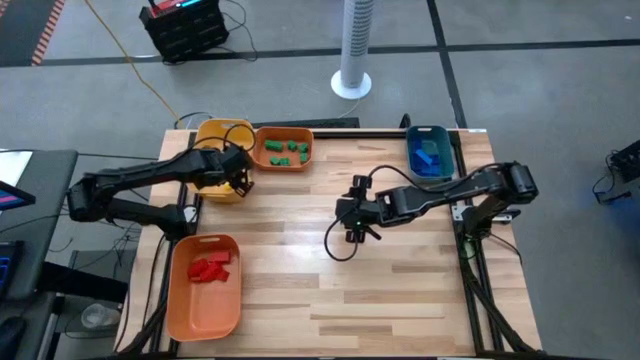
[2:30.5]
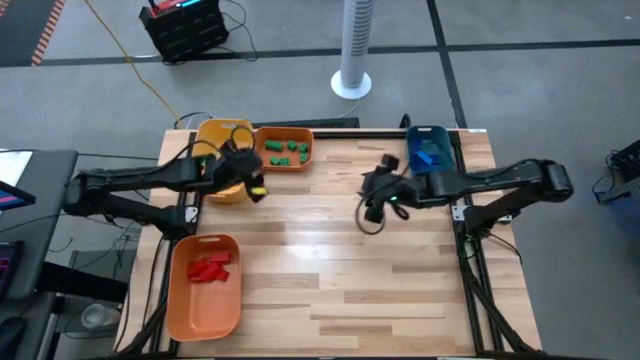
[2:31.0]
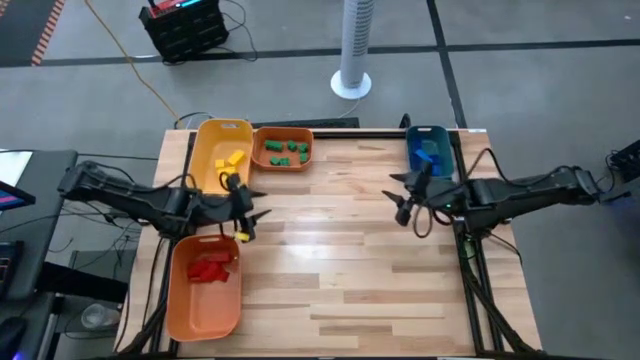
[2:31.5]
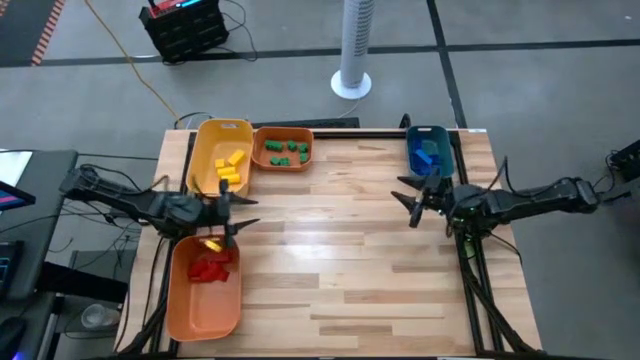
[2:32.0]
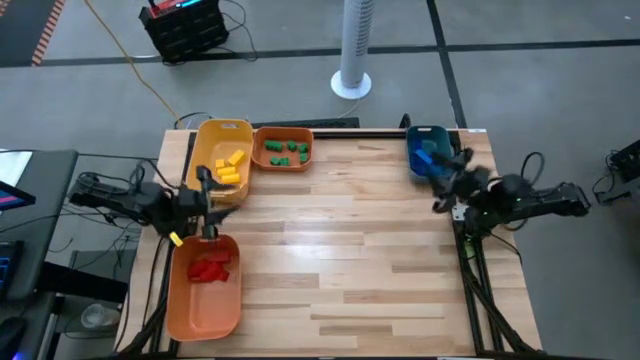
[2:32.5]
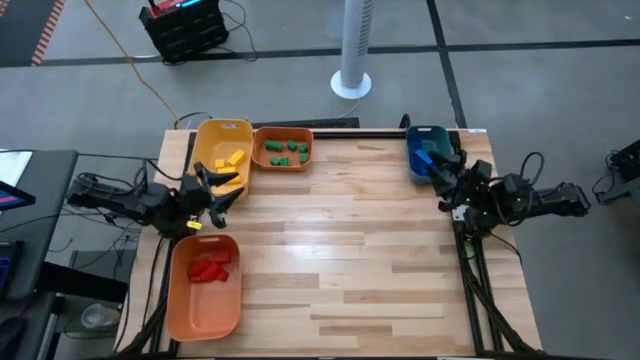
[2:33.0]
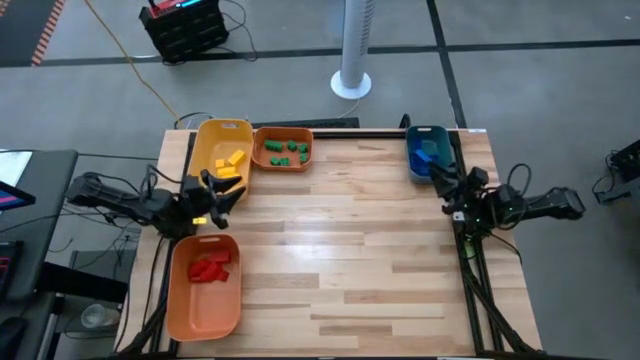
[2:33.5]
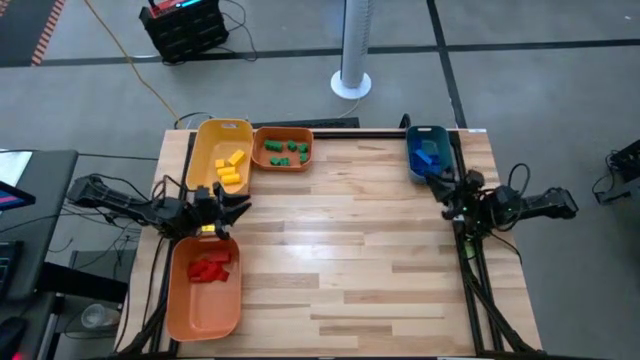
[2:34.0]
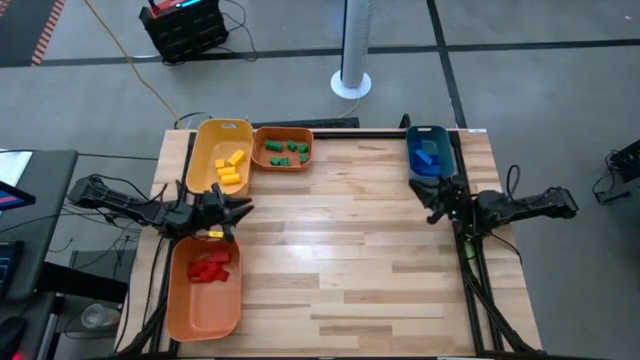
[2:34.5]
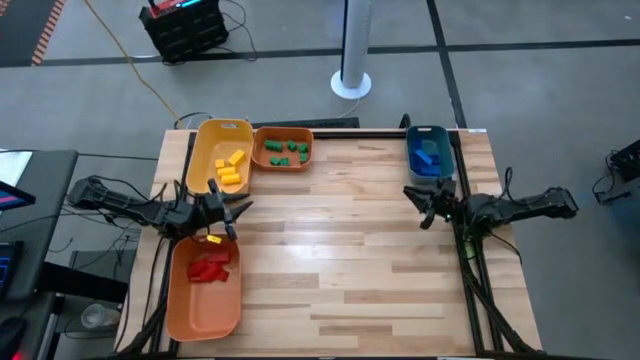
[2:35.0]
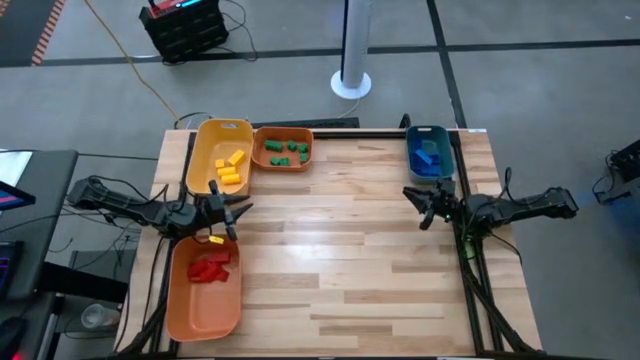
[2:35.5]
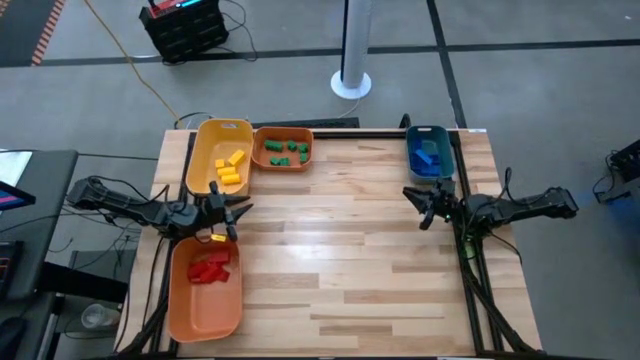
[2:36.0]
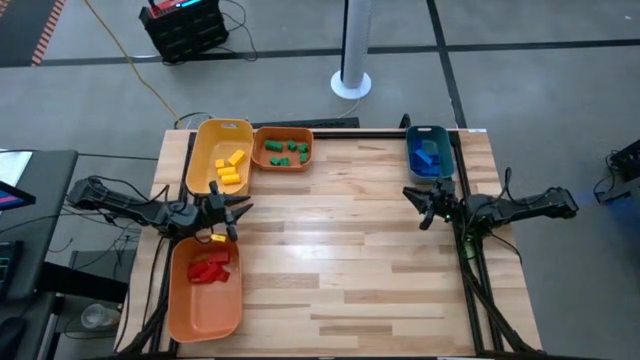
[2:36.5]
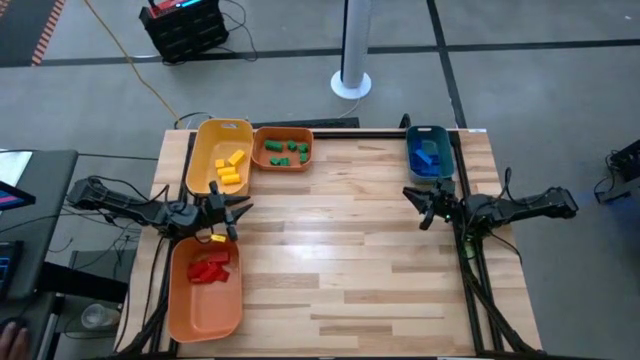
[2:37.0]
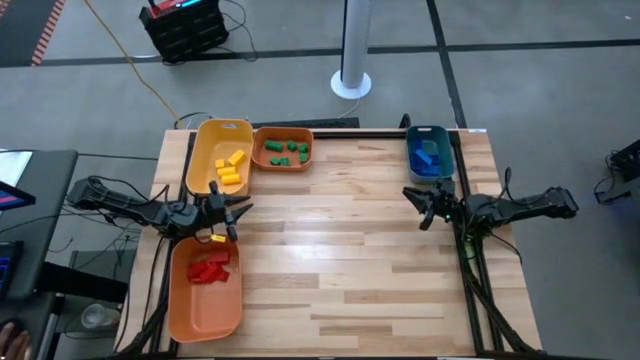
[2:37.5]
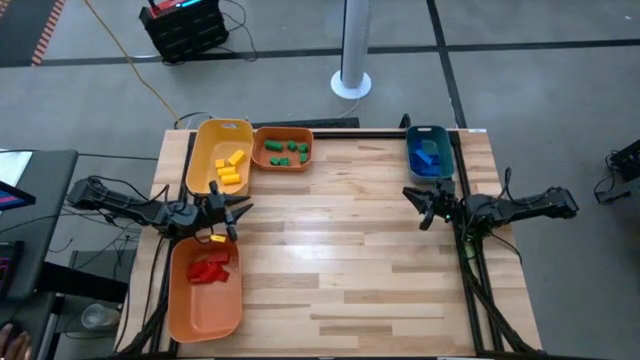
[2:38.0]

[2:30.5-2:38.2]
Task: Sort blocks
Return to Home Position

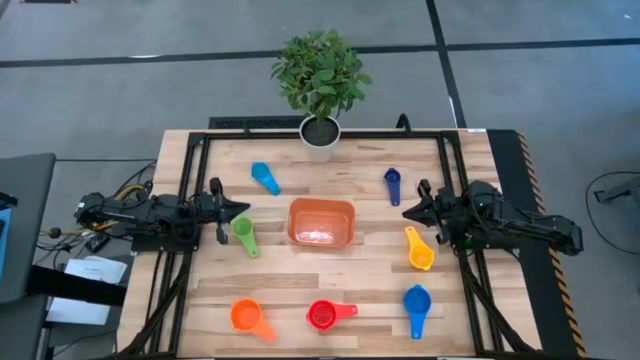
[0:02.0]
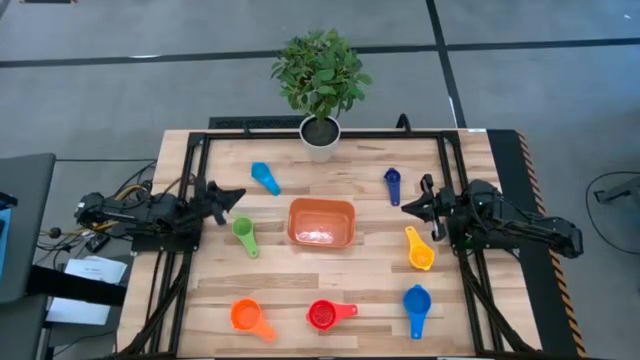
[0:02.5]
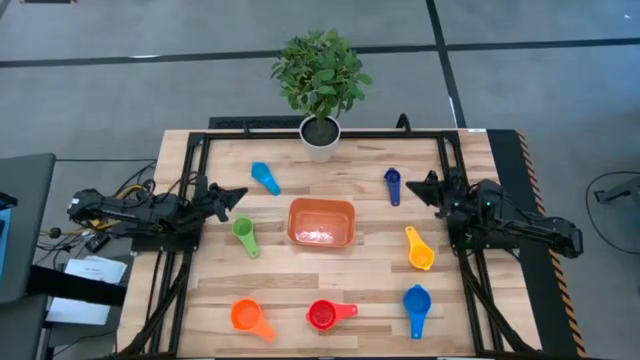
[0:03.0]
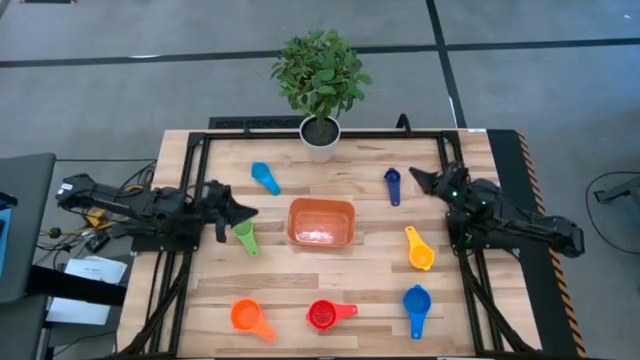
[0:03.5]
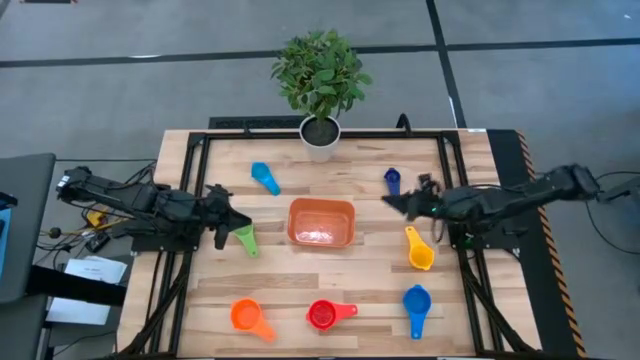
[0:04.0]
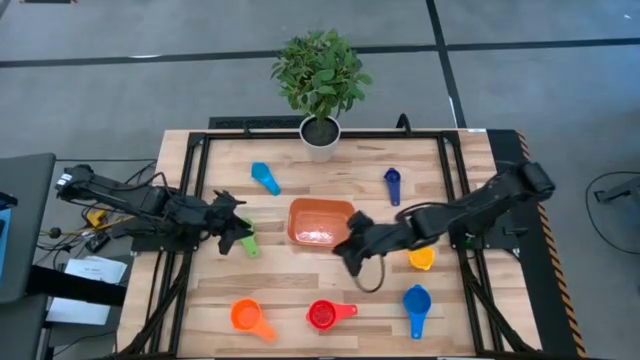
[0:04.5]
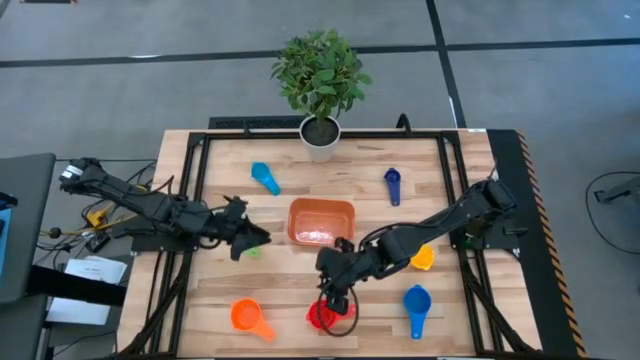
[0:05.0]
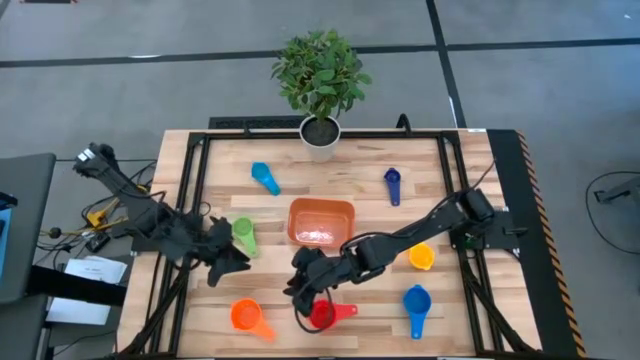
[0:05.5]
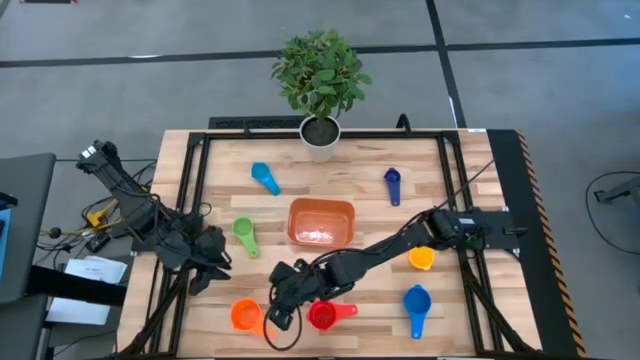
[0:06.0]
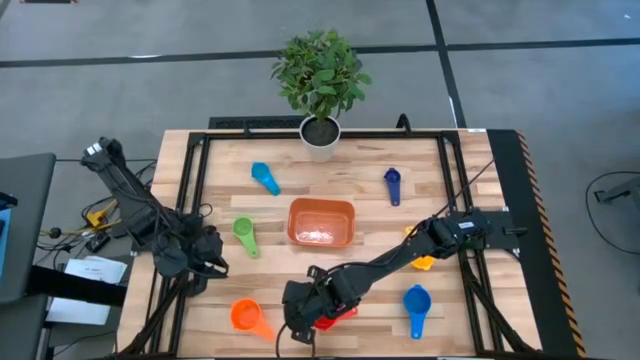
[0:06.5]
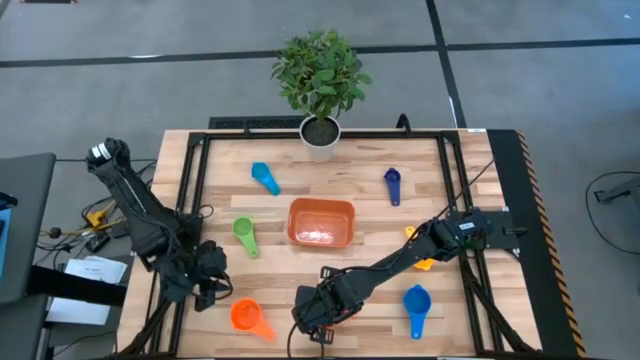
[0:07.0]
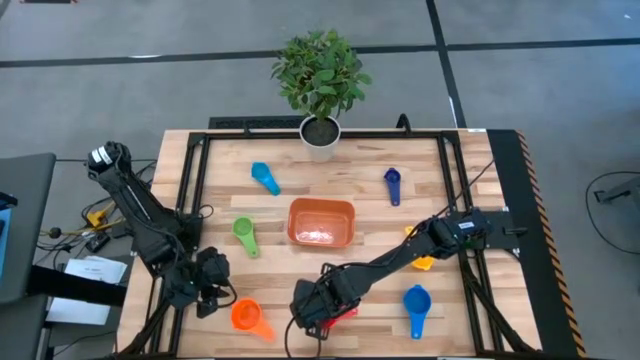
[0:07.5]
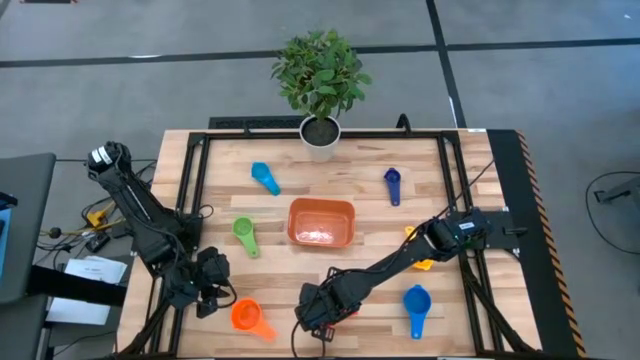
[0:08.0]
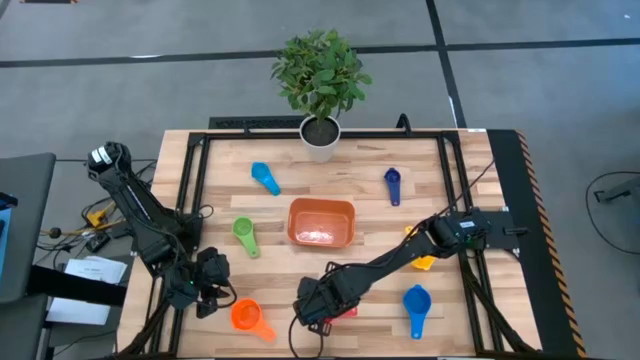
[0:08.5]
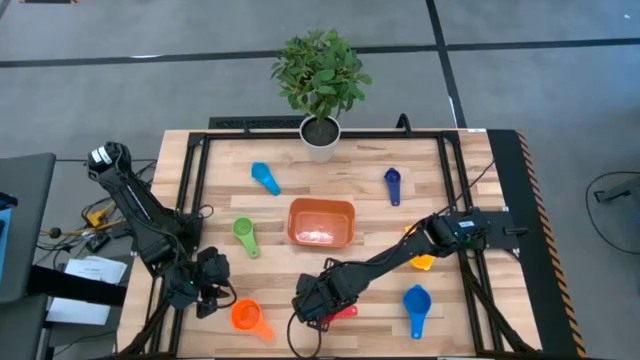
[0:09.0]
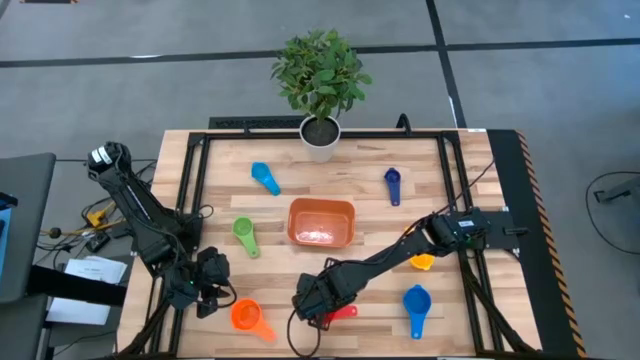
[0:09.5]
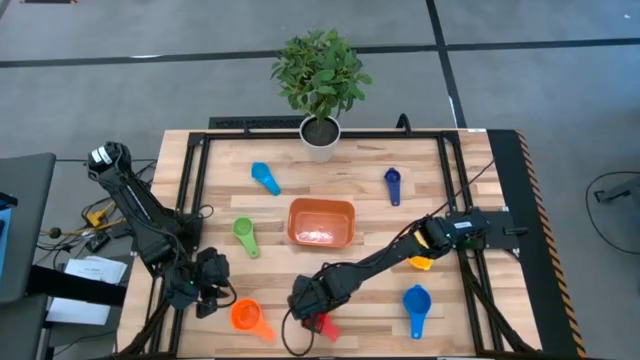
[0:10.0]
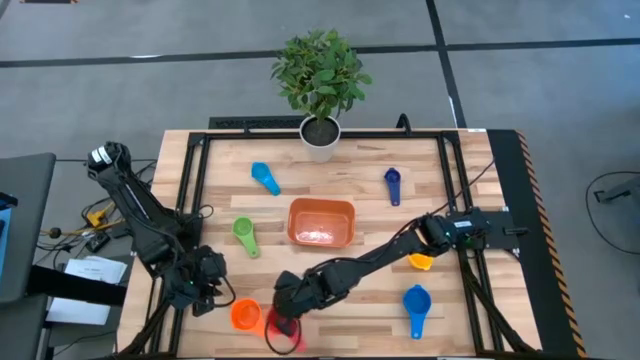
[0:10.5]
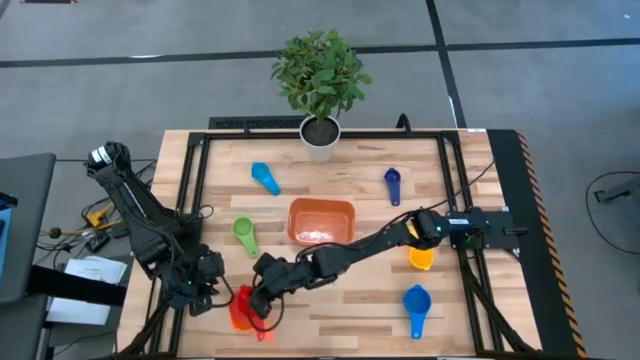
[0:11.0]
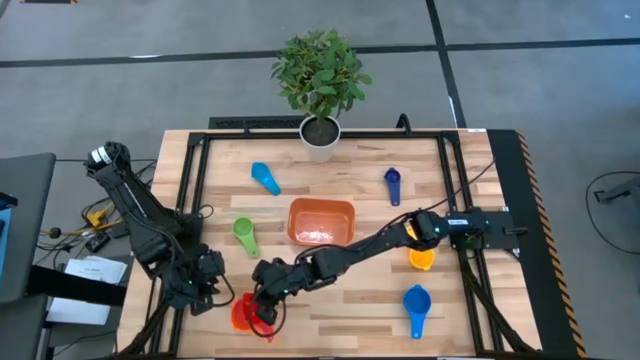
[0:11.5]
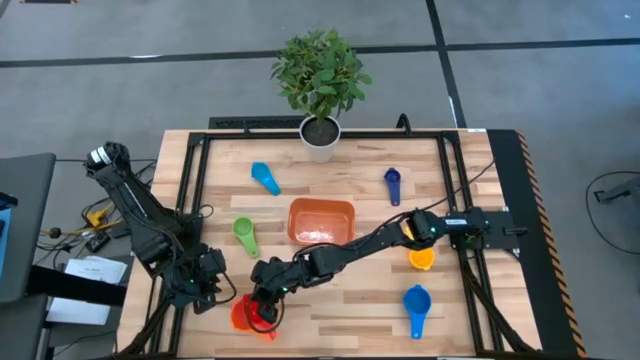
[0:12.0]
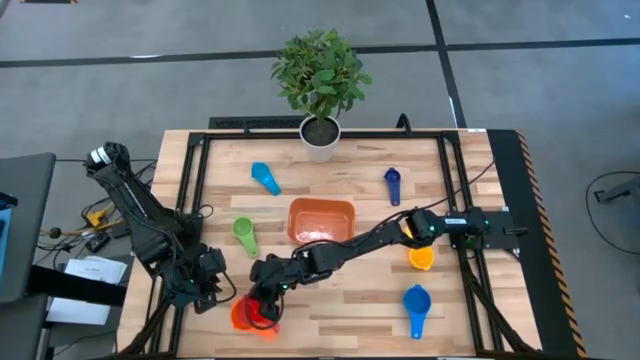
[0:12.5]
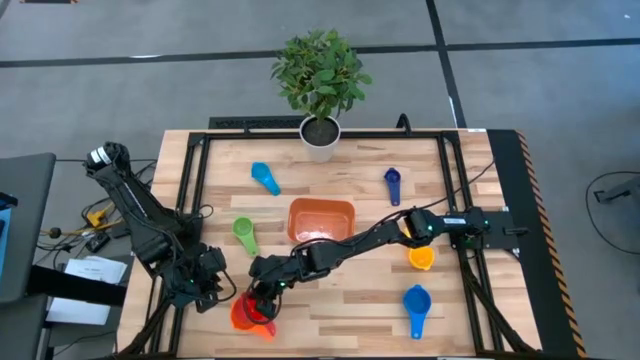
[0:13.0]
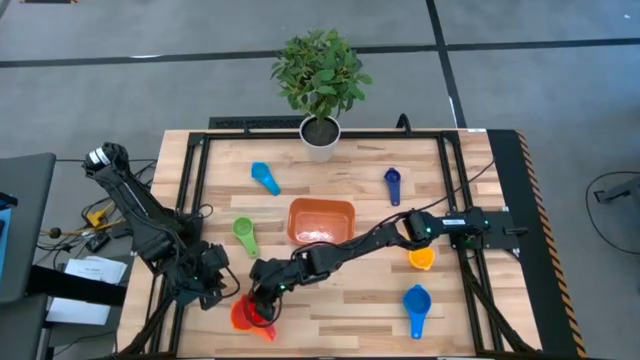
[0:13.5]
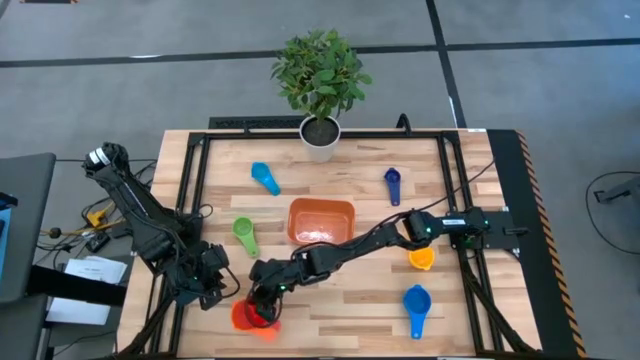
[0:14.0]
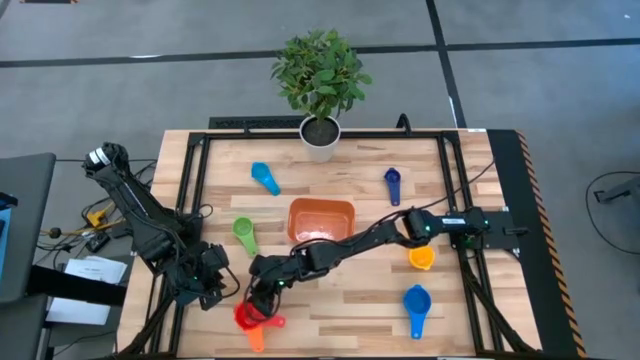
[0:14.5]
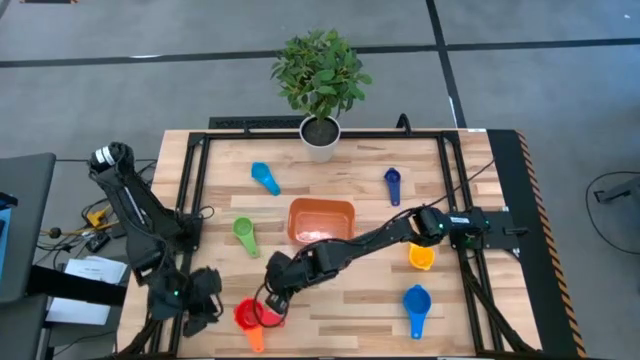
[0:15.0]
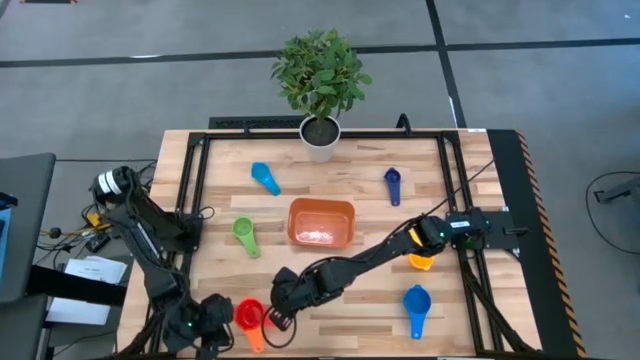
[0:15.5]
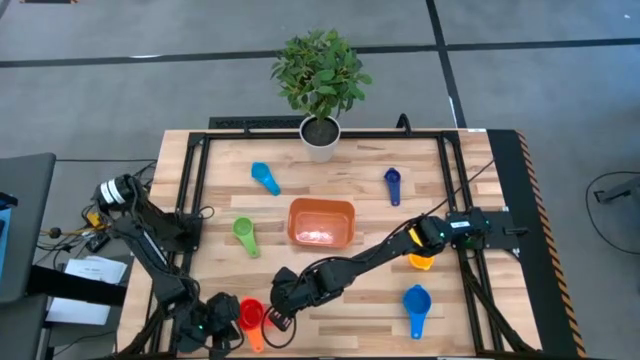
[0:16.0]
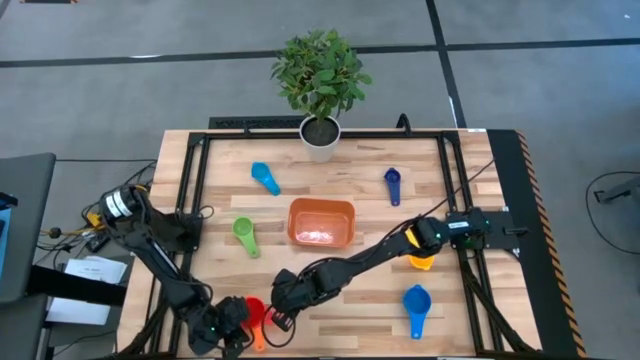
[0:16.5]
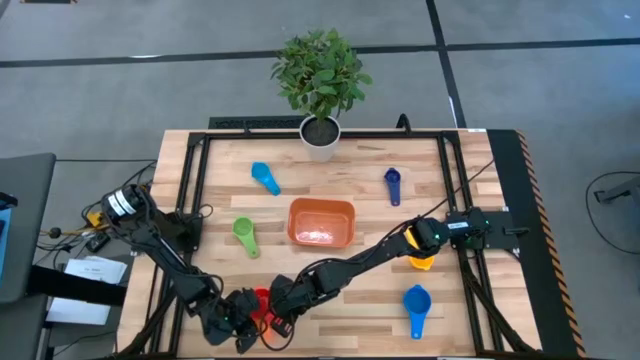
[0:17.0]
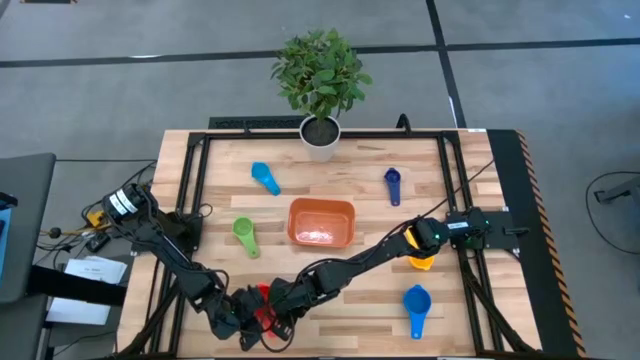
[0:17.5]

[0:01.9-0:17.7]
Task: Nest measuring cups in basket
Stack the red measuring cup on top of the orange measuring cup
